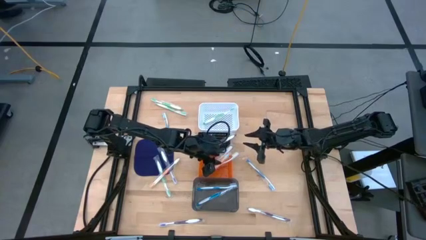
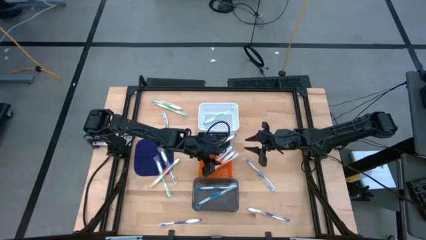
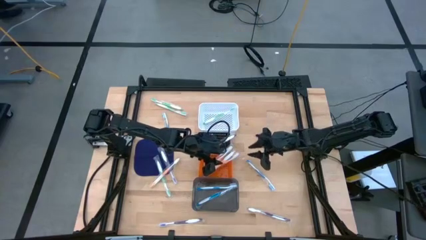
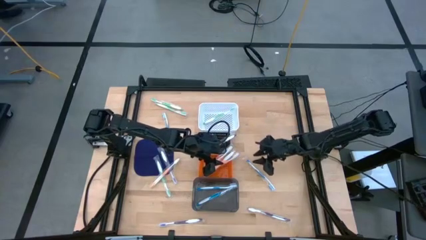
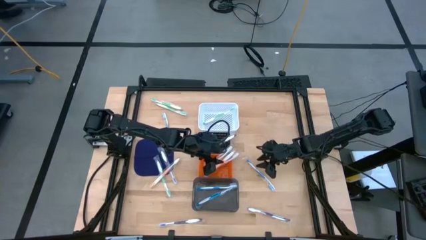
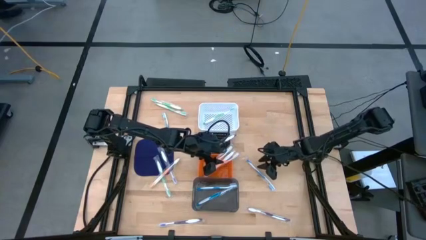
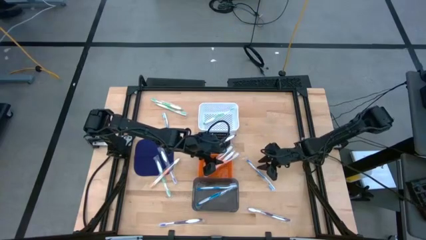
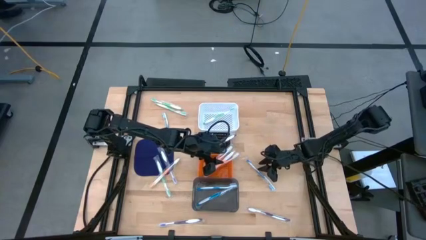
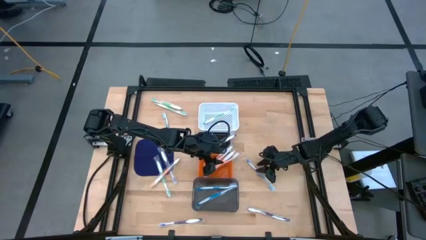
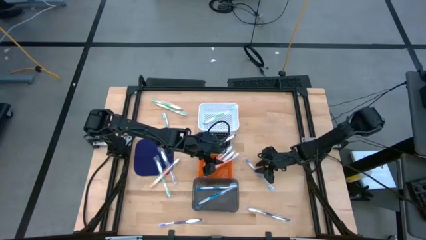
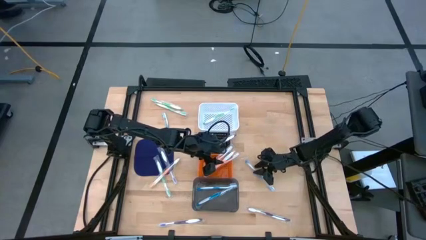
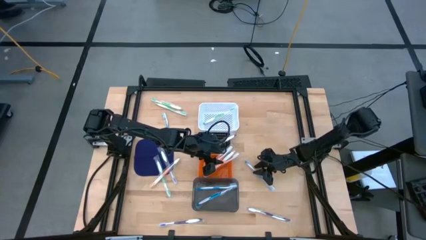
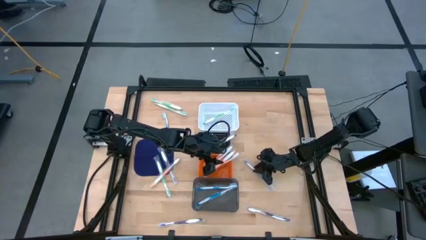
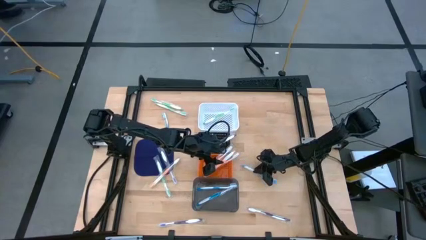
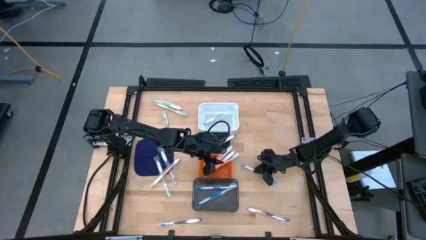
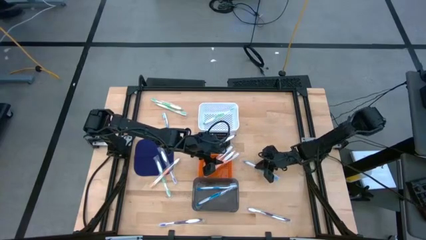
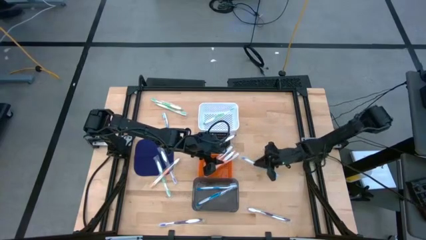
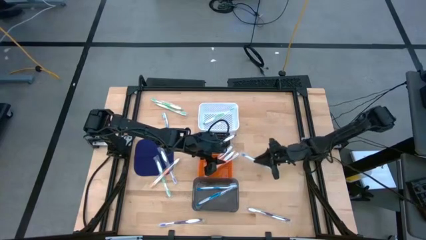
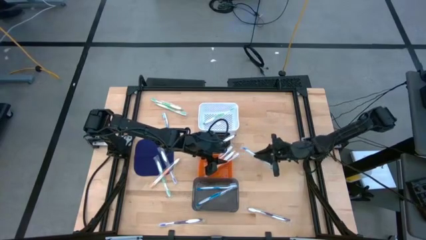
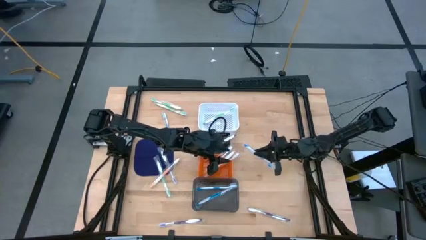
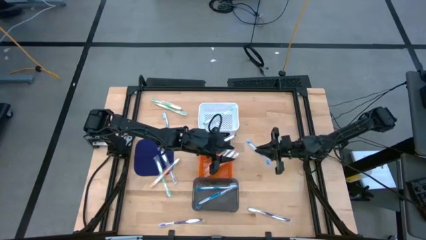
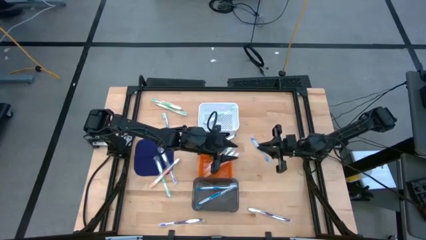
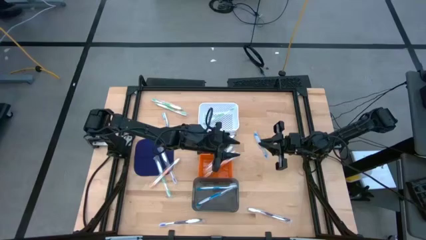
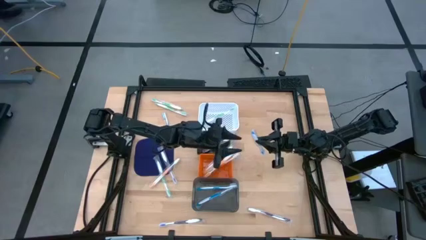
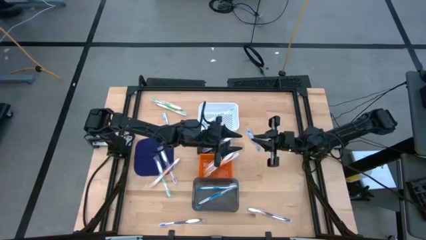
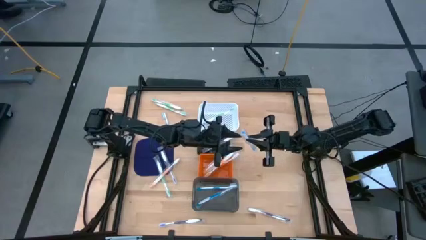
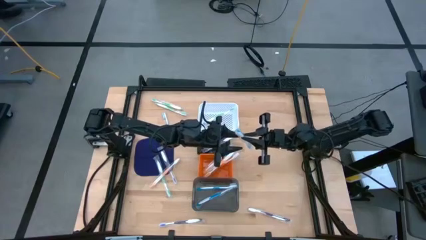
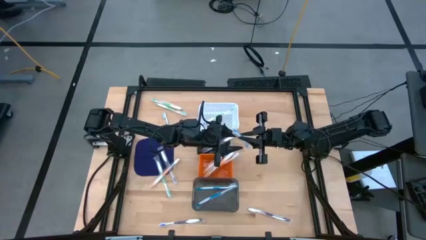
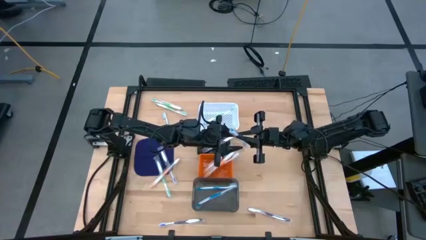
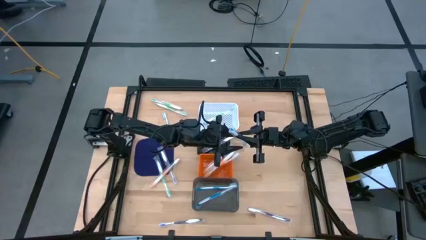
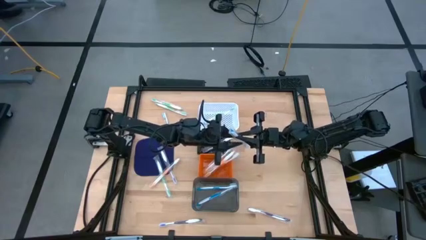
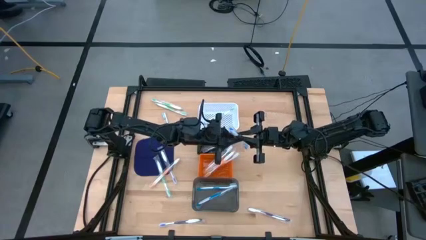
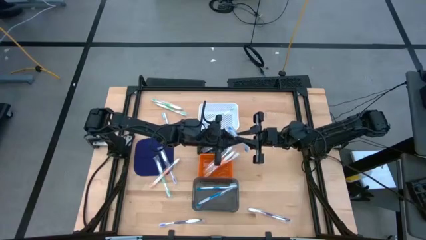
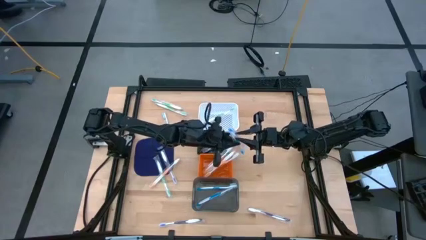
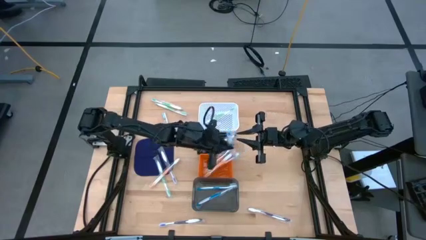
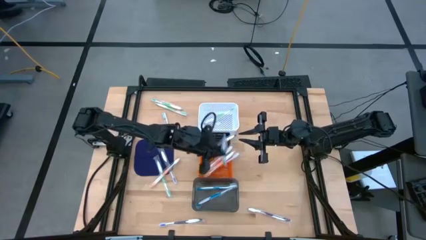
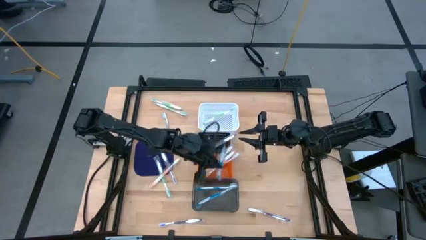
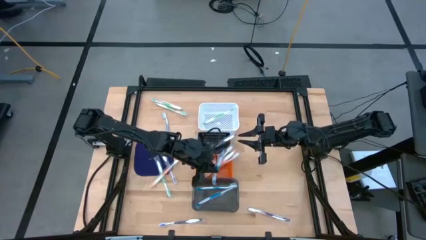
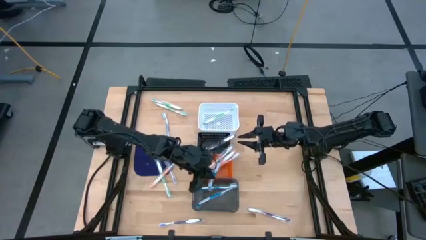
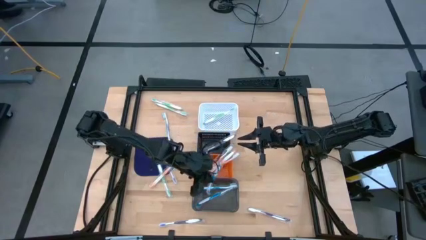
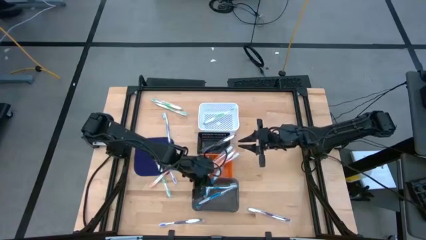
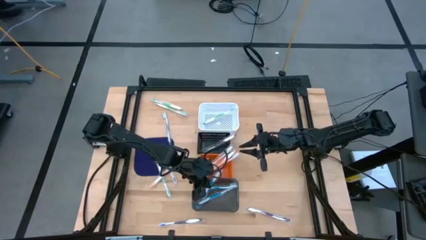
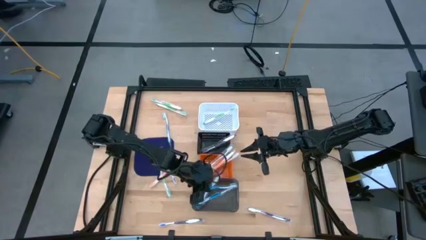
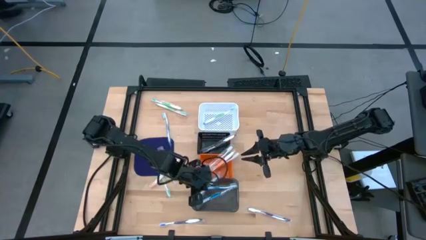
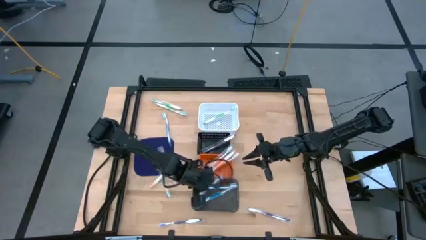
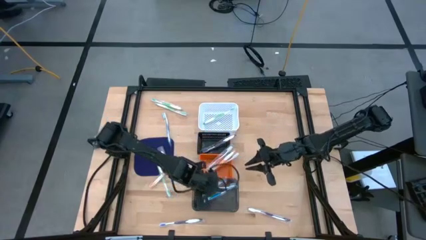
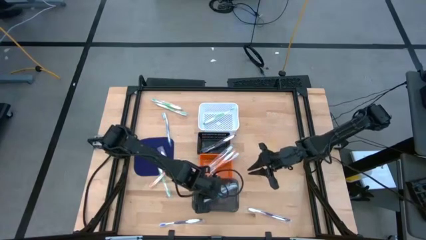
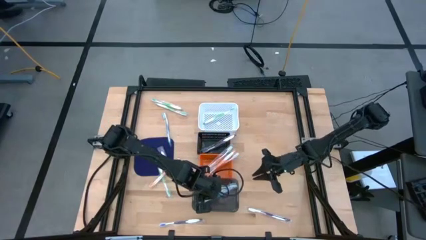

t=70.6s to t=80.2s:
Task: Pick & Place Toothbrushes
Put the right blue toothbrush into the black bin

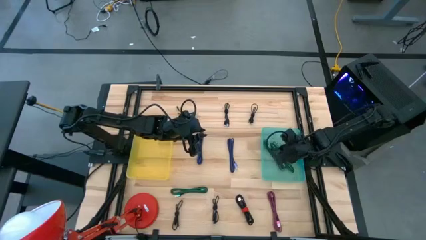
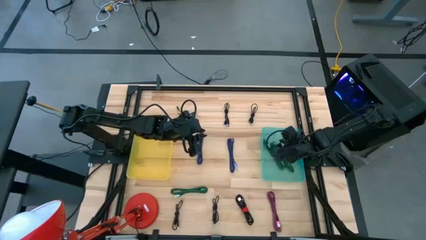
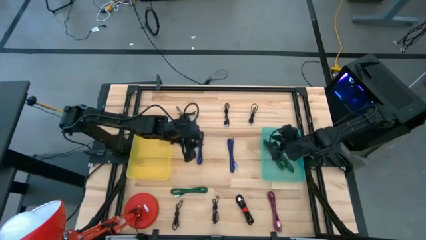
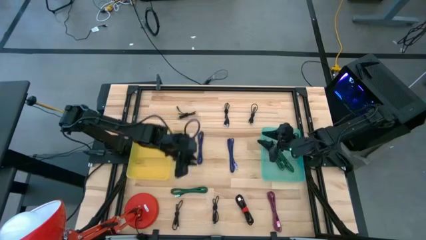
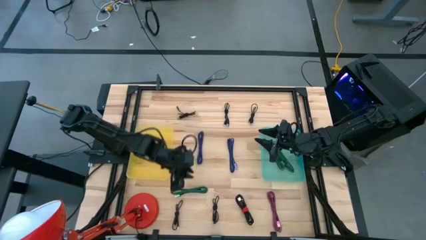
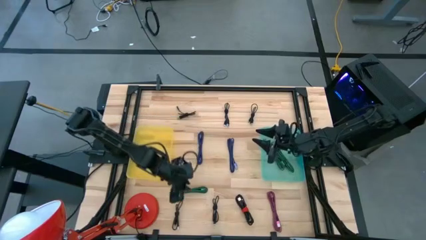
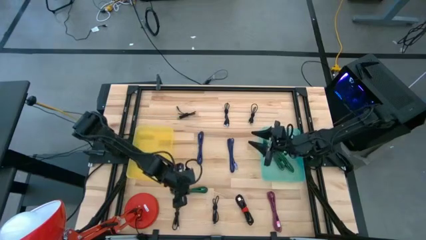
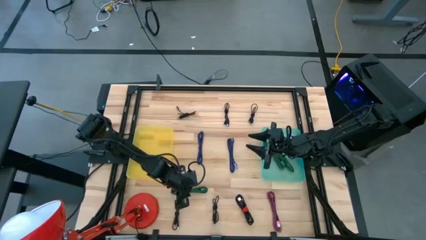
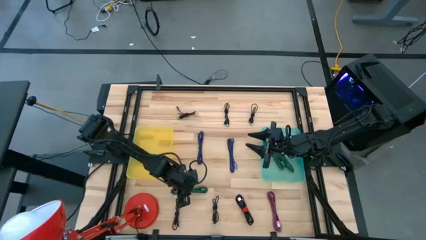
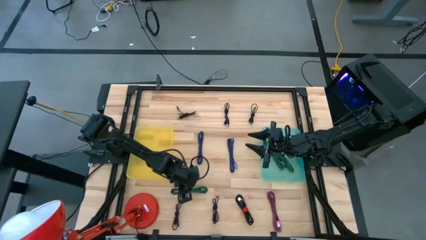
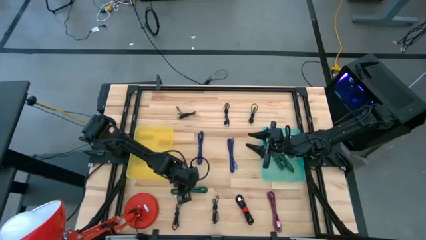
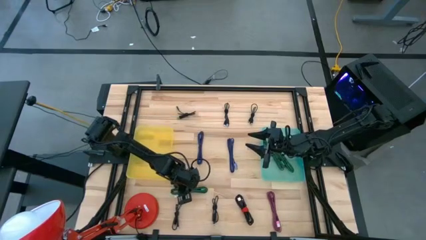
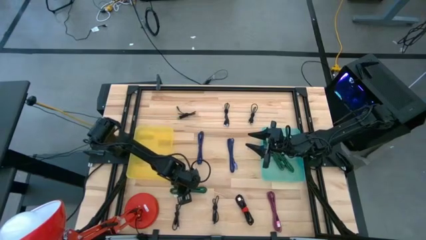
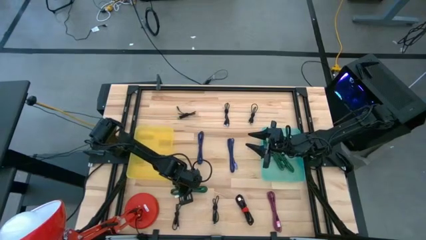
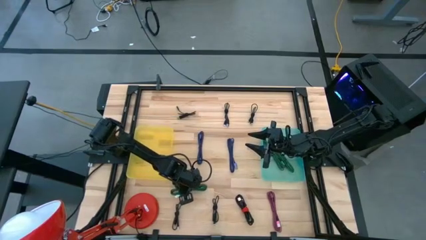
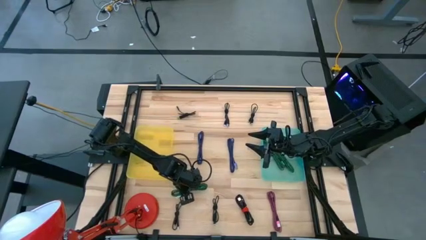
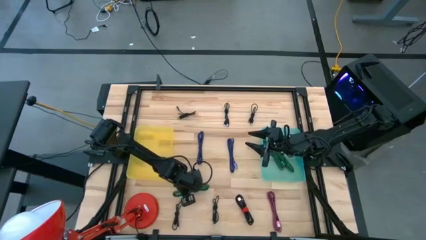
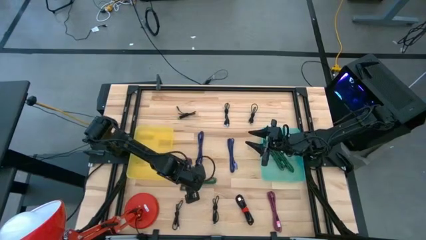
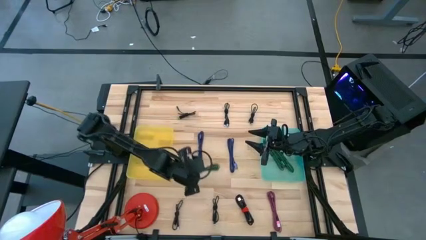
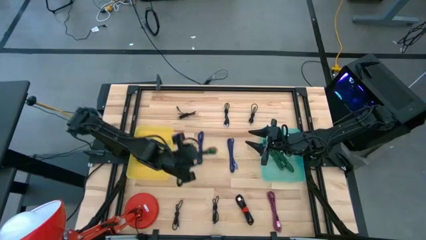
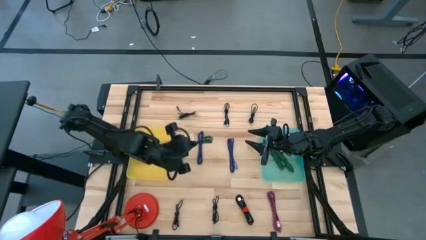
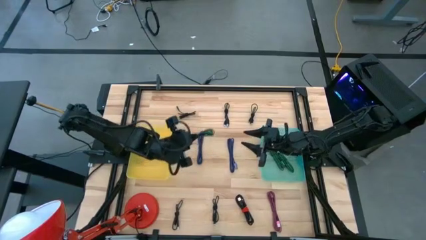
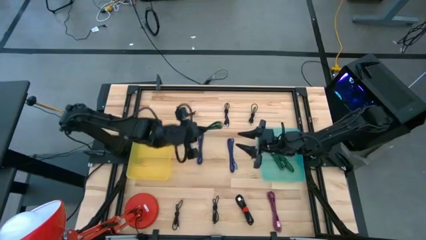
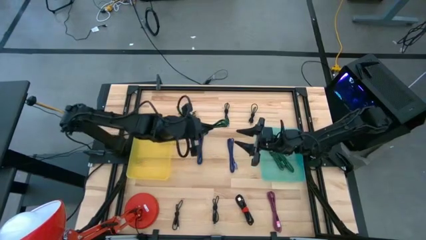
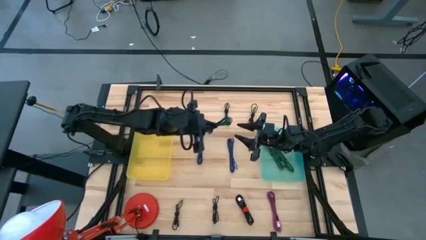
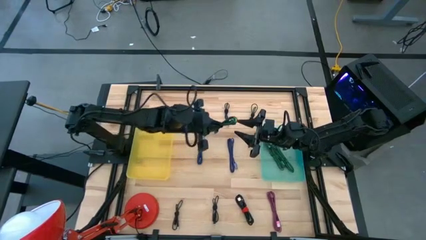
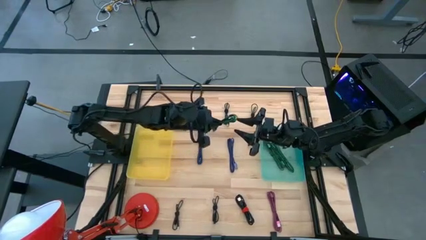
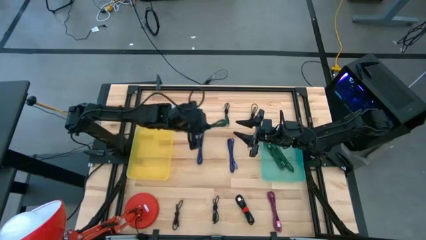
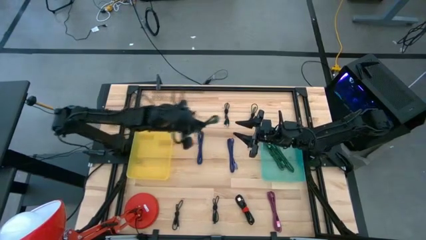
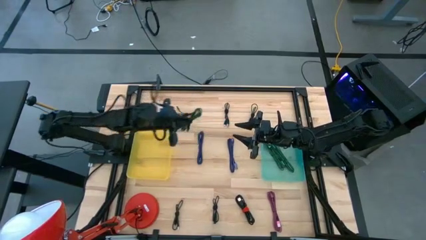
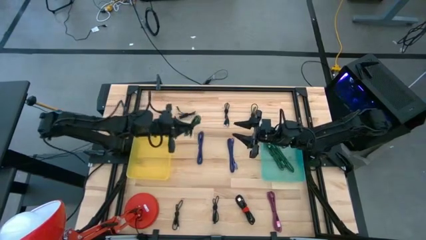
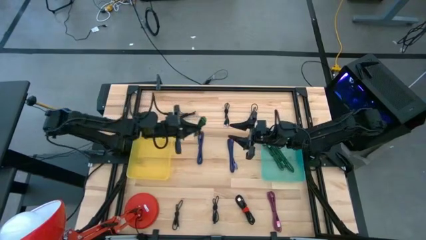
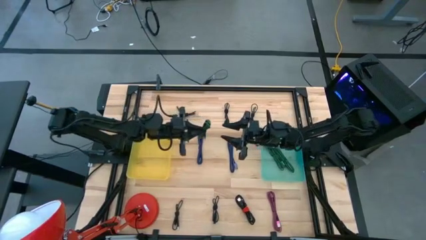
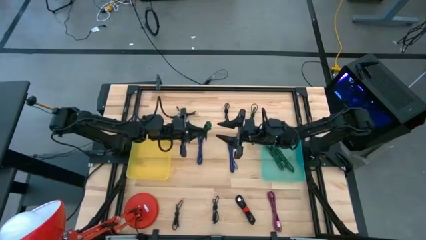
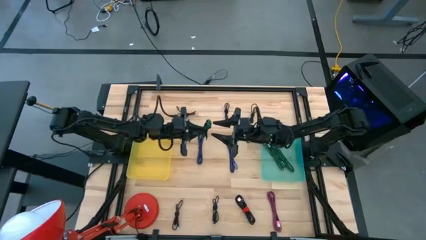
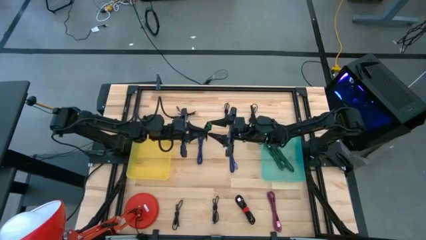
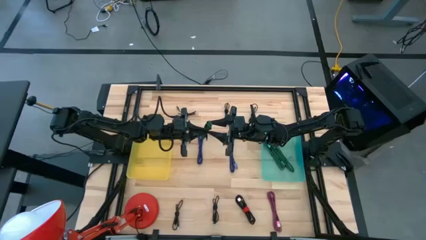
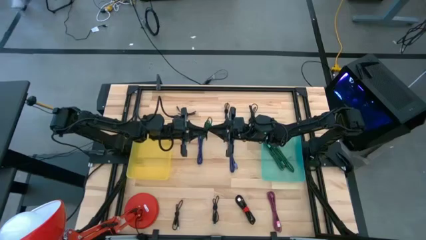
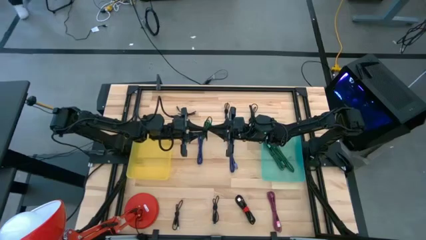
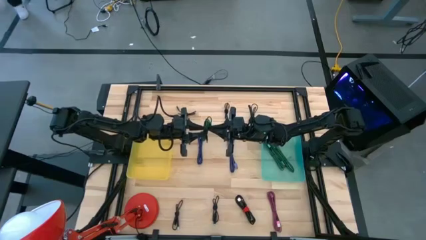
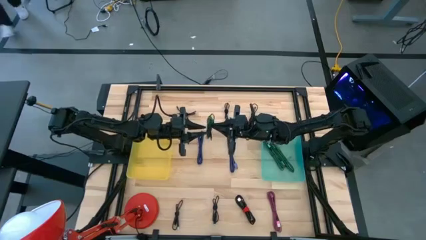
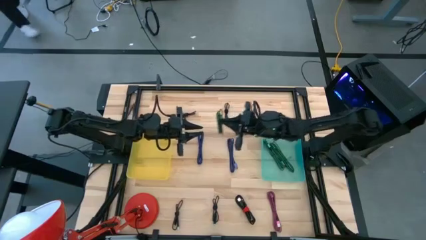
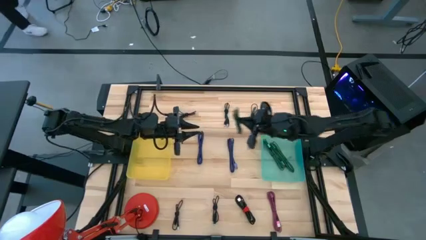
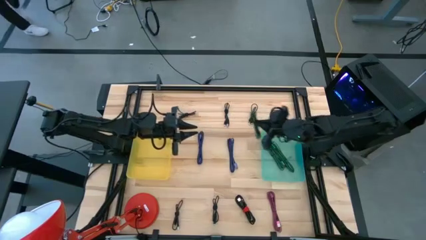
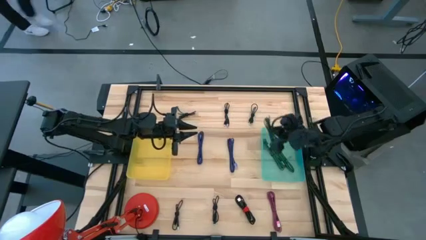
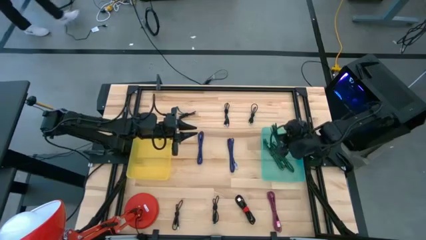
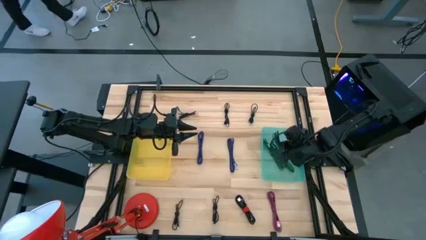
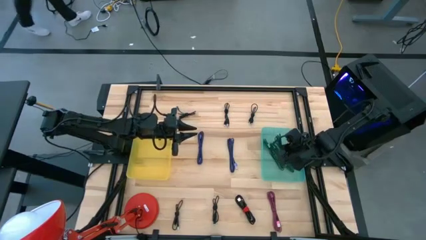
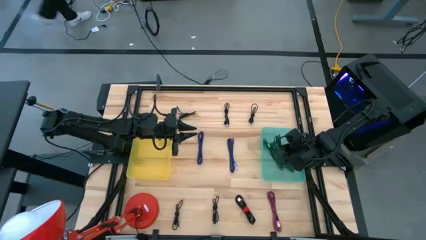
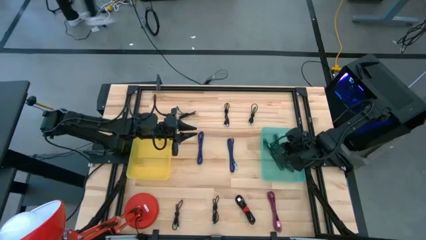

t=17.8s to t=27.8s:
Task: Pick & Place USB Port
Put the green and black charger cable into the light green bin
